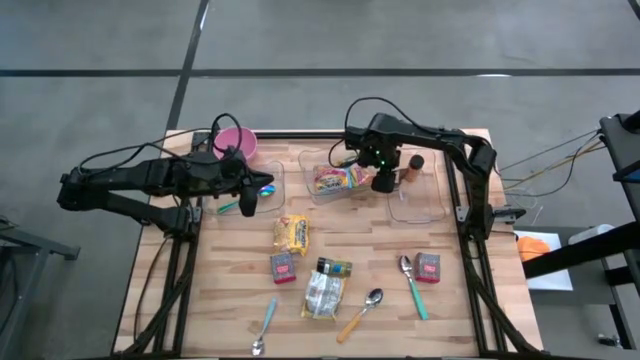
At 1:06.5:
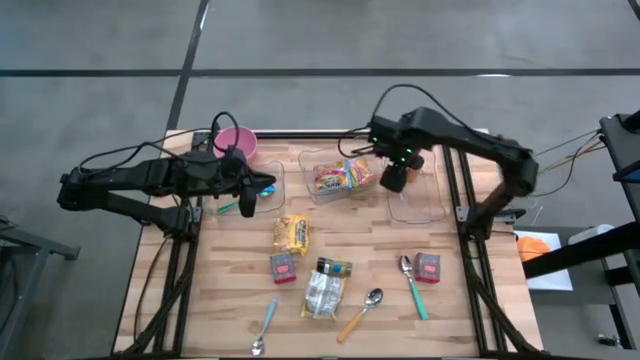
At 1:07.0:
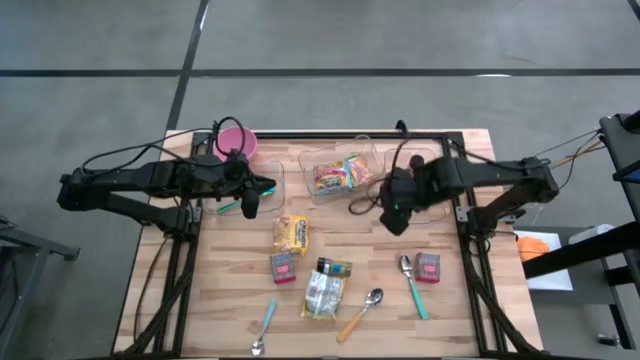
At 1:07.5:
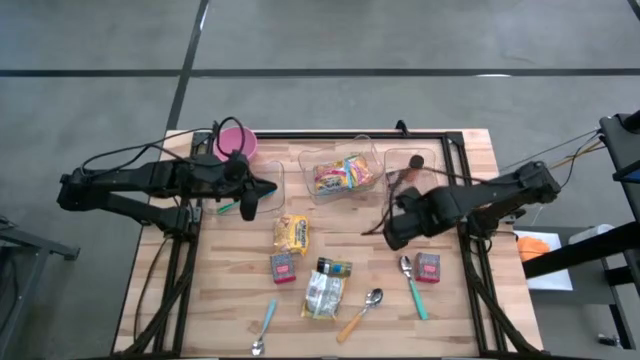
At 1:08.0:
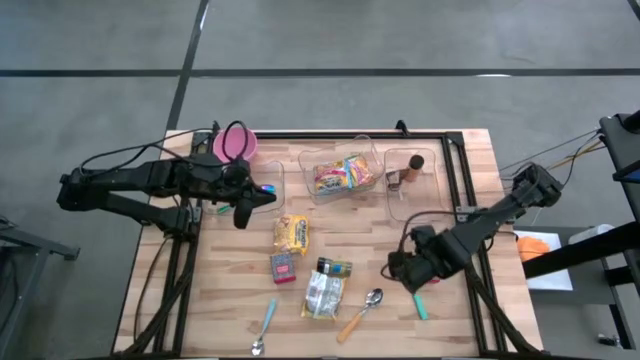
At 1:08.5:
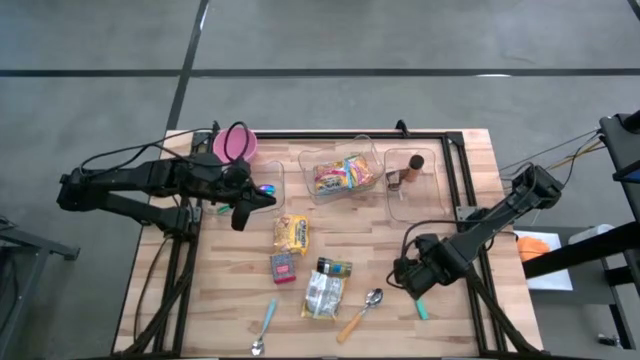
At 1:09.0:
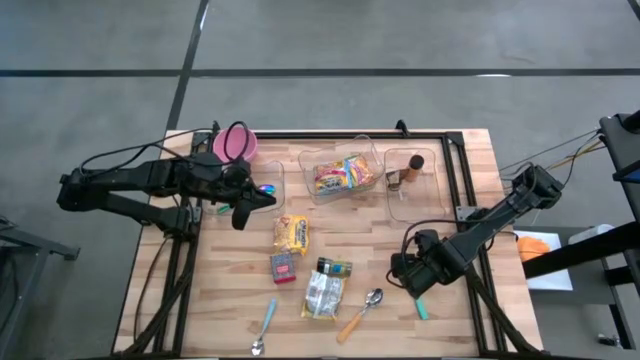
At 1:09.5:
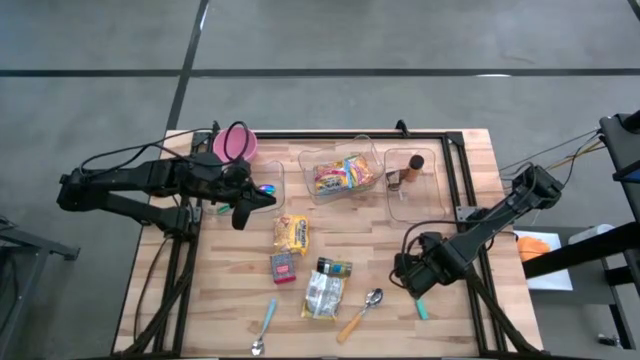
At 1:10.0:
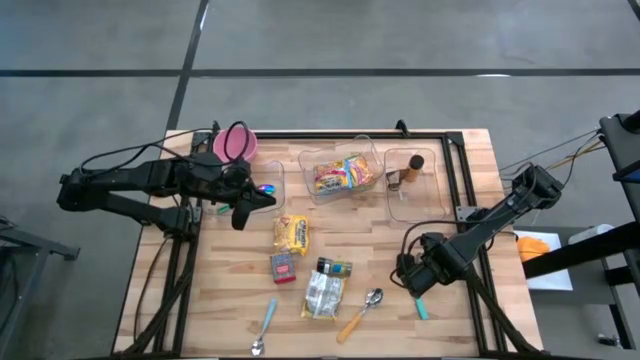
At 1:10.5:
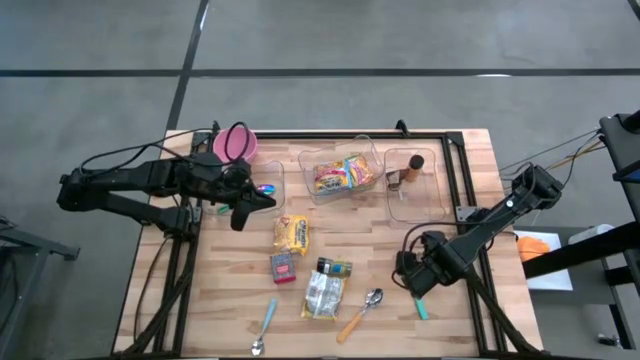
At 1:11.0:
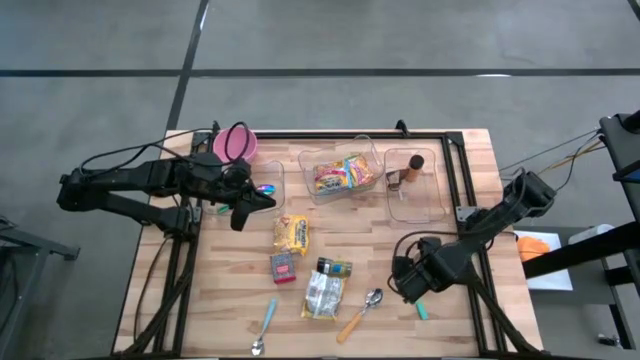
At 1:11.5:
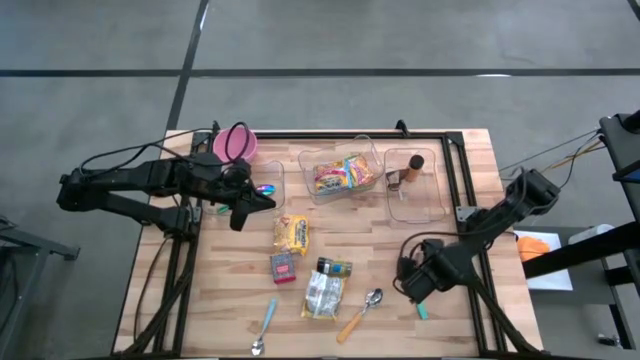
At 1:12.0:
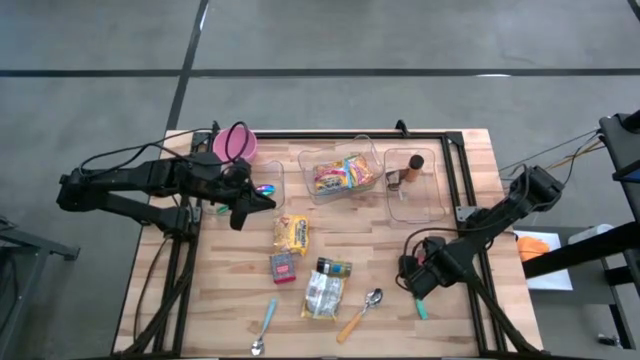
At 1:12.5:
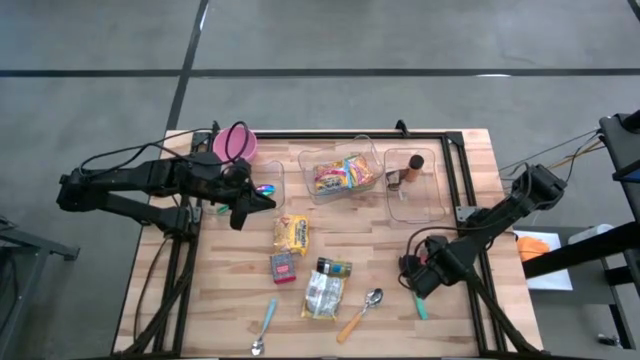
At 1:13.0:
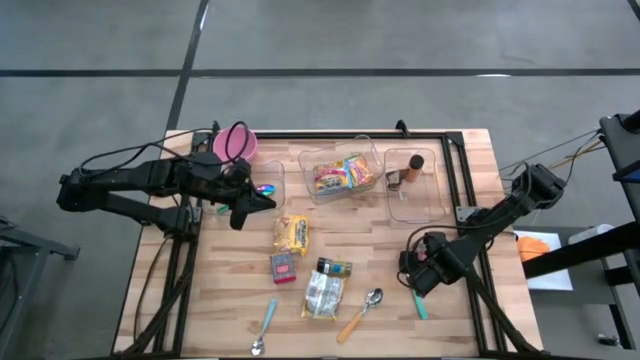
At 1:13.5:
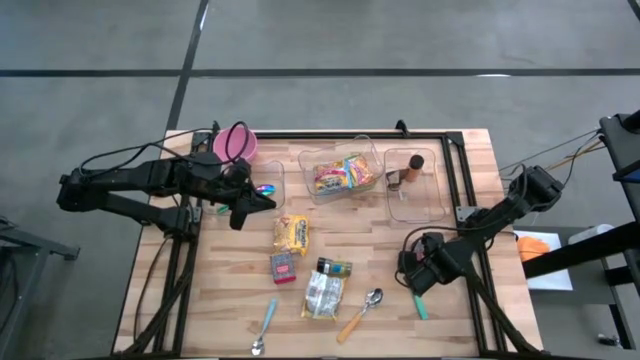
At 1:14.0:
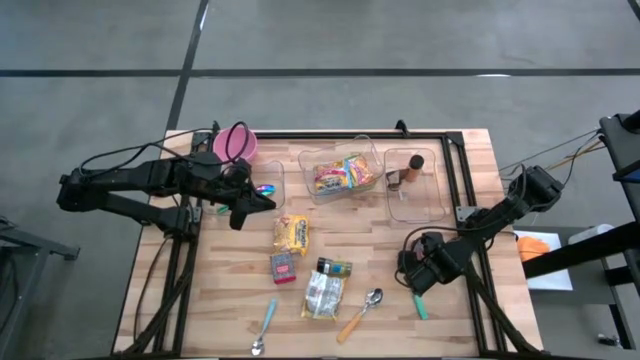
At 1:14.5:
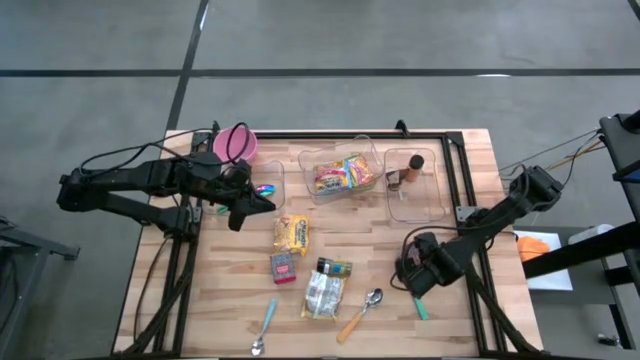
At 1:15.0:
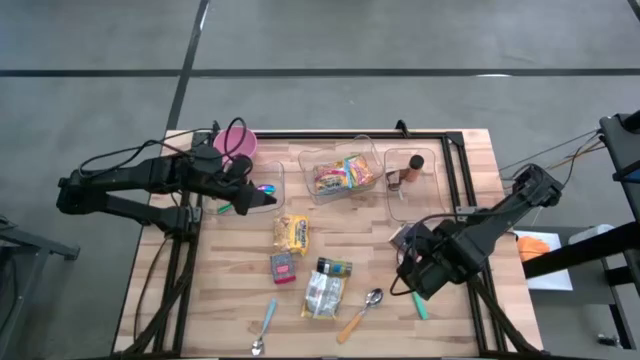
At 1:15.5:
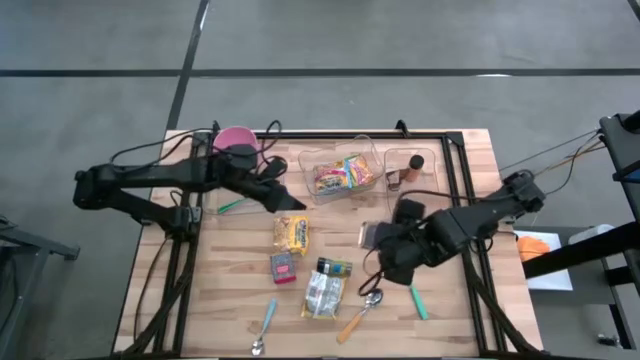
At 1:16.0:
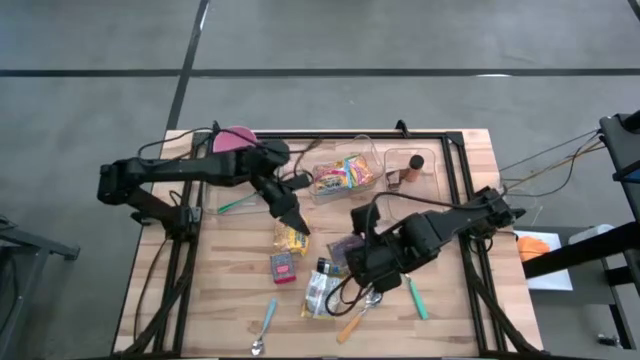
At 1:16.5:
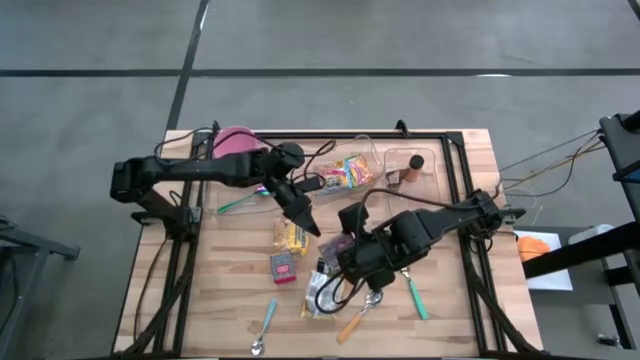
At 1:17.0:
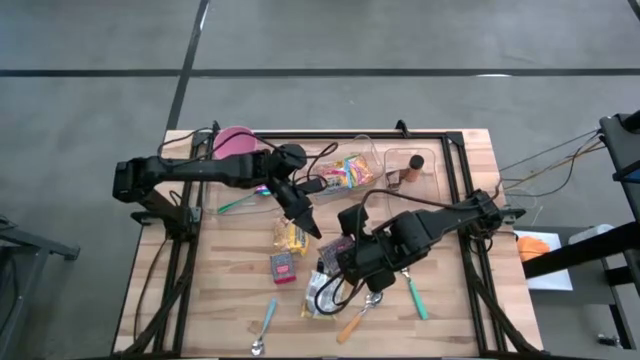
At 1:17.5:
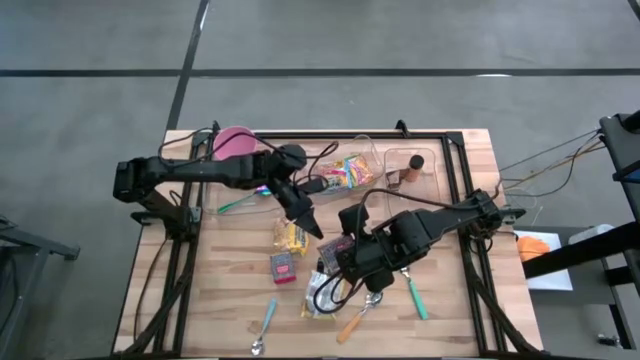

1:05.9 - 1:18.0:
Put the red seasoning can into the right transparent bin

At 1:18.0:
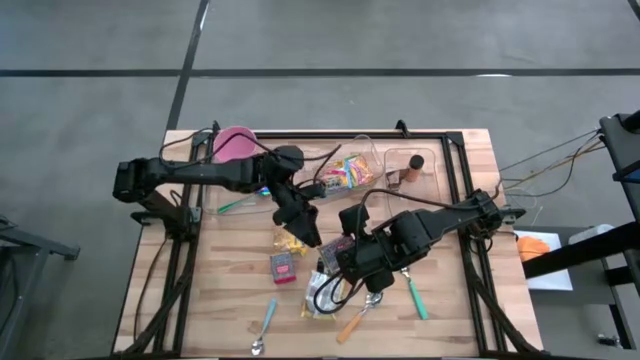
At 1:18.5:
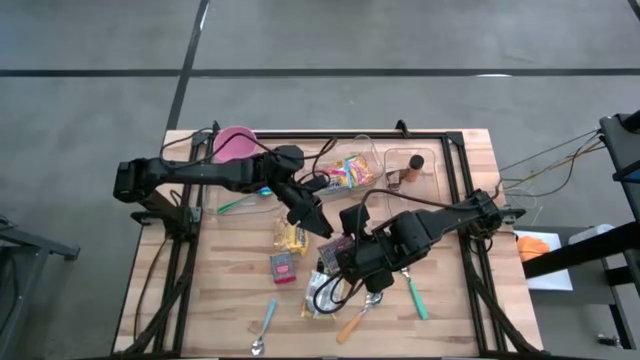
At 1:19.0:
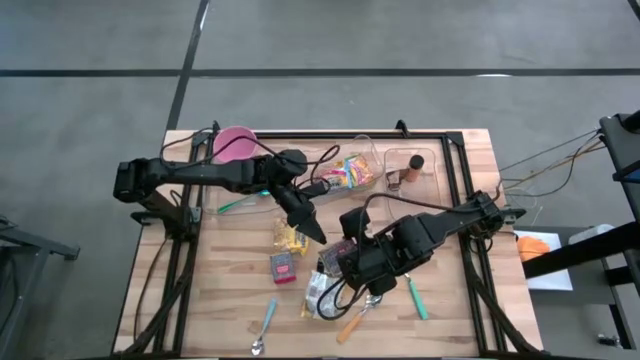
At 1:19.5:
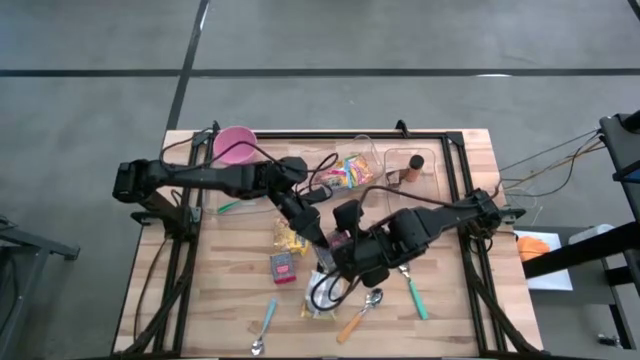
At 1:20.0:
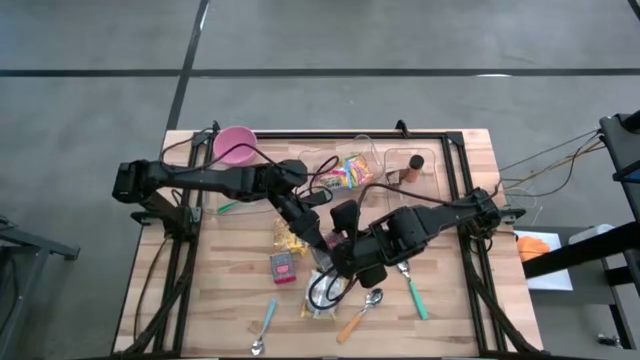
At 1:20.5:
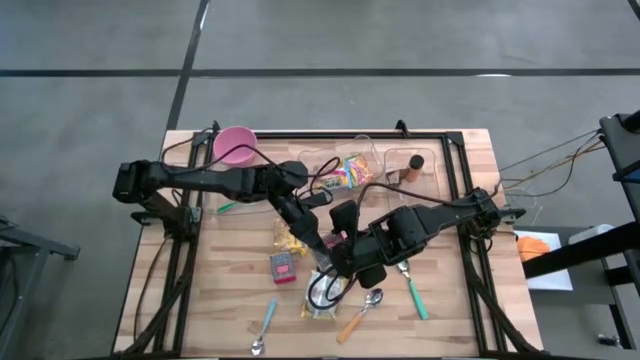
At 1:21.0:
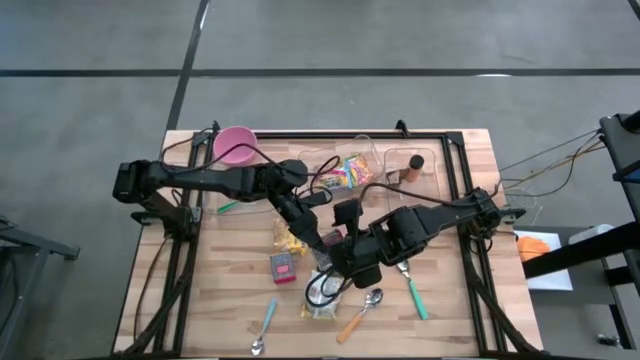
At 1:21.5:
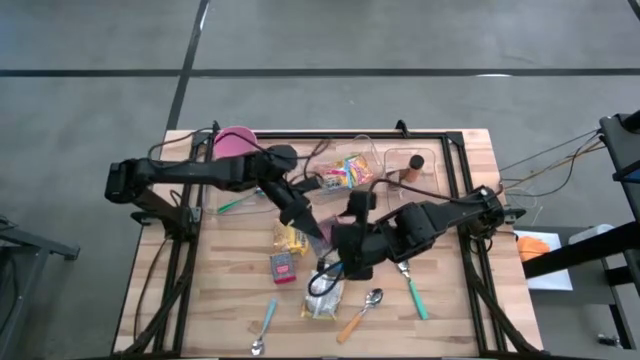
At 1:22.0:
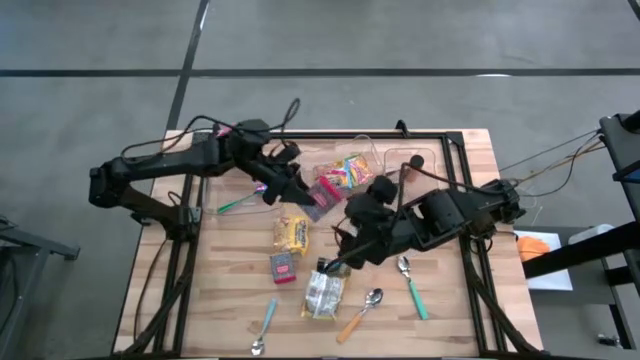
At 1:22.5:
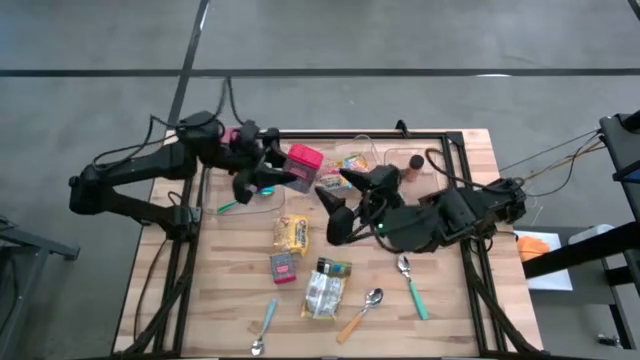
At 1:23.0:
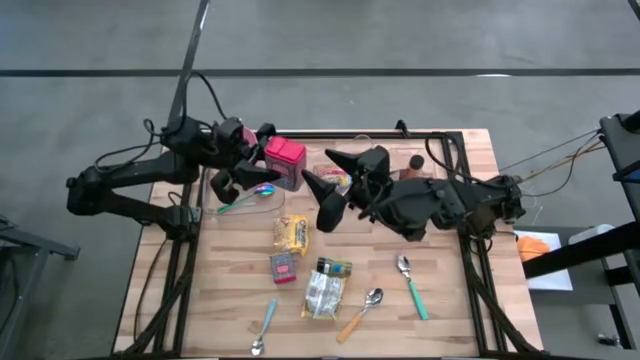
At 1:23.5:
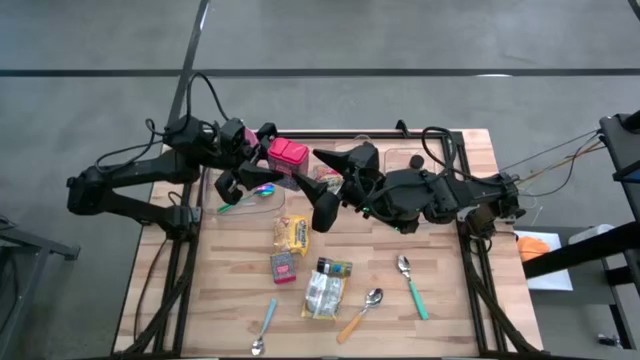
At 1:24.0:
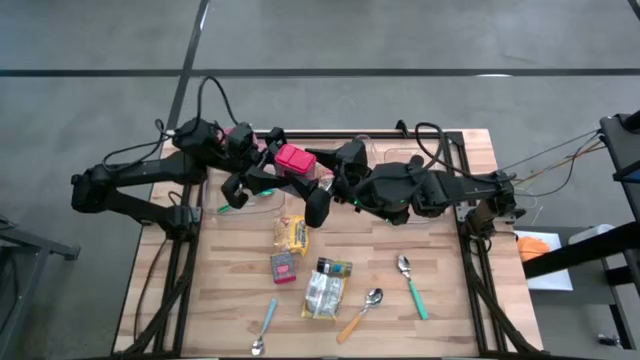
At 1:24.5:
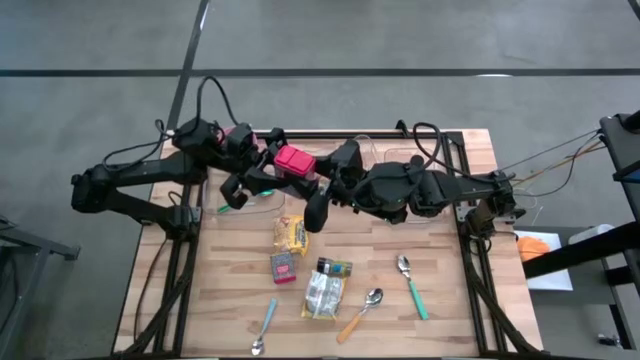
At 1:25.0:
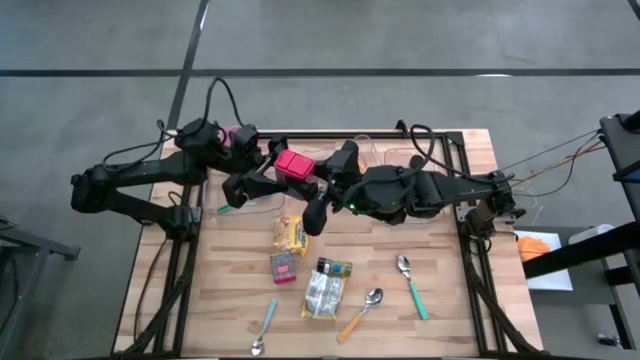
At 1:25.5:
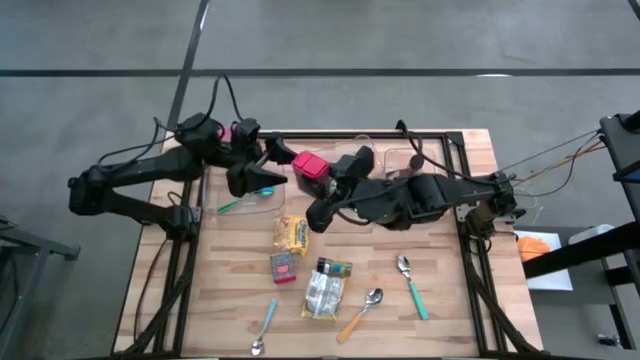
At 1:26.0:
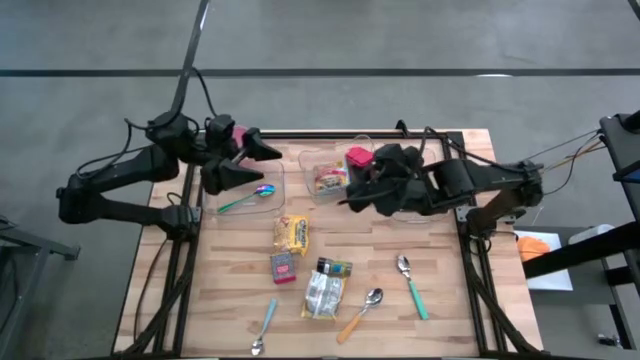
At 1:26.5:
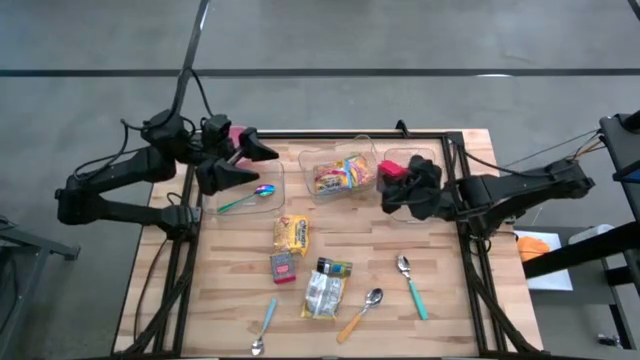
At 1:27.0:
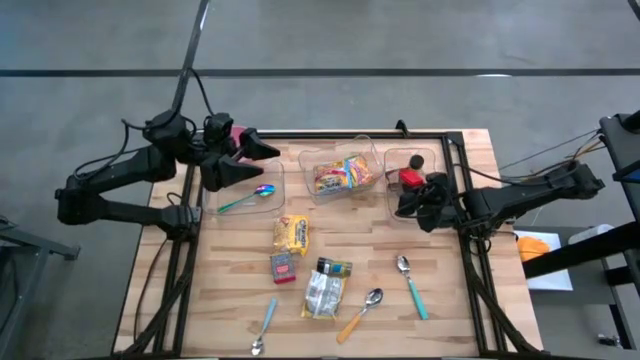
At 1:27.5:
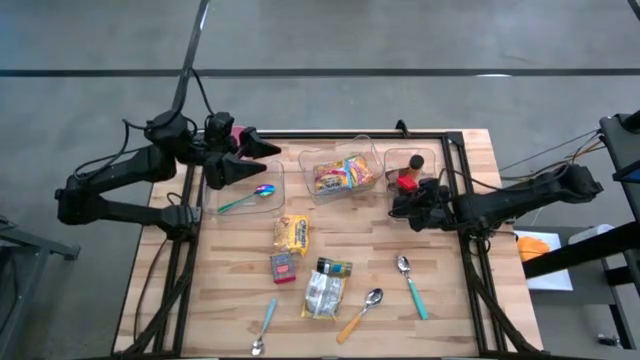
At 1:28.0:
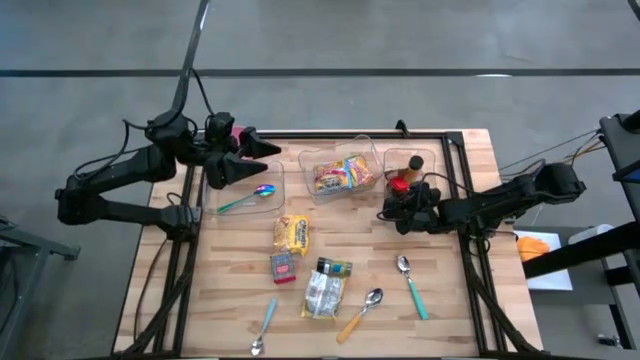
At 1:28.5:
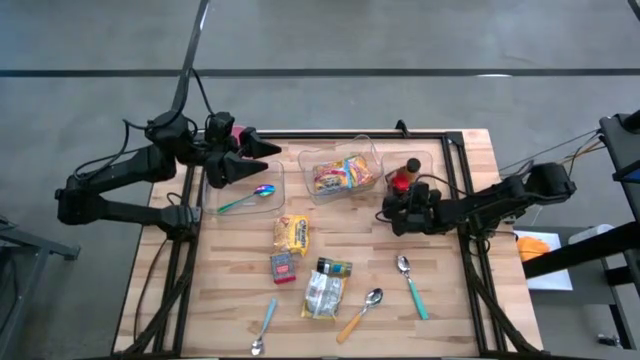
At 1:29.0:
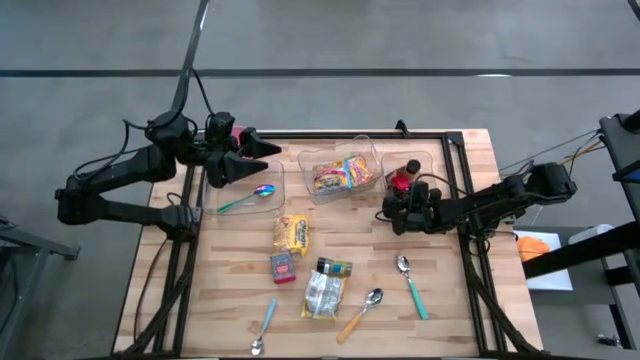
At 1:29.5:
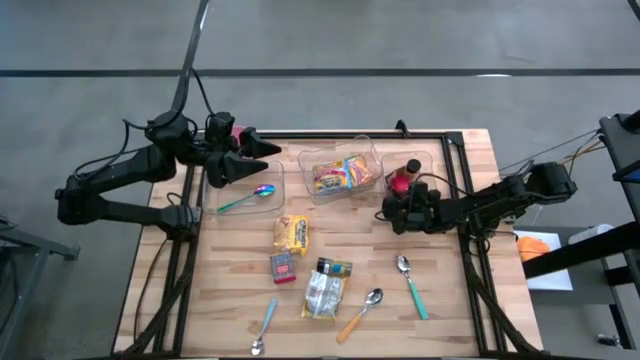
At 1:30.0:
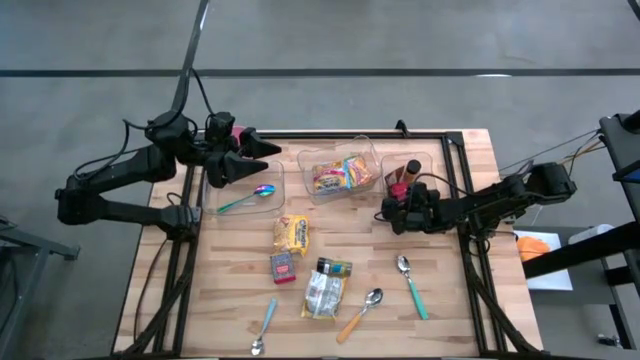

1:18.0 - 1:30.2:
Put the red seasoning can into the right transparent bin
